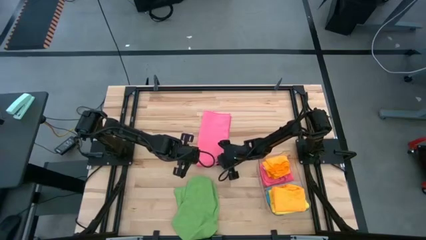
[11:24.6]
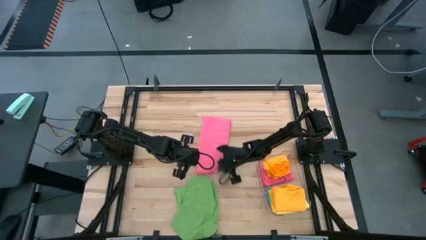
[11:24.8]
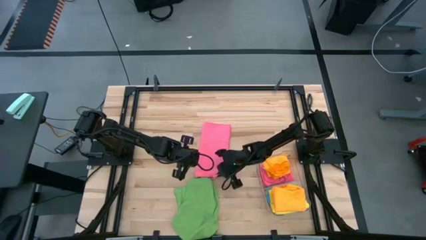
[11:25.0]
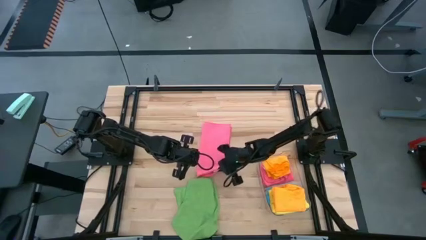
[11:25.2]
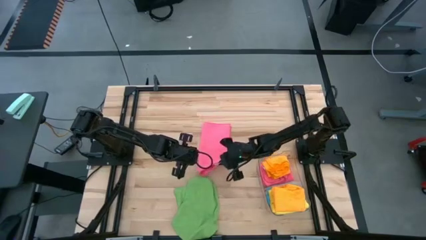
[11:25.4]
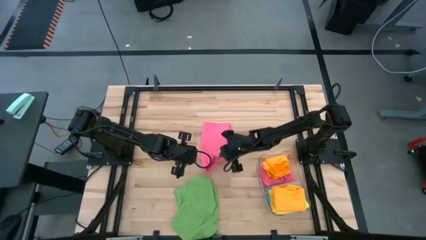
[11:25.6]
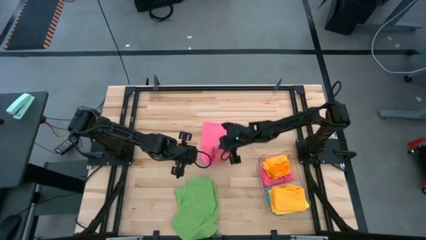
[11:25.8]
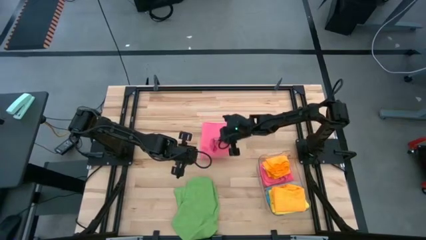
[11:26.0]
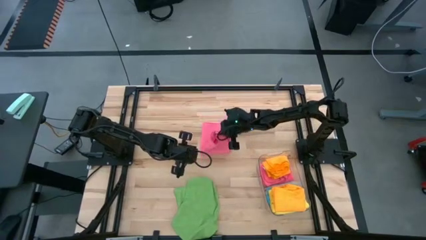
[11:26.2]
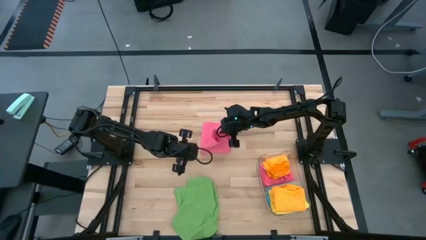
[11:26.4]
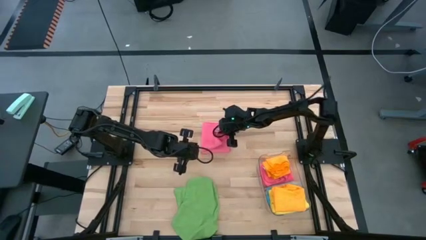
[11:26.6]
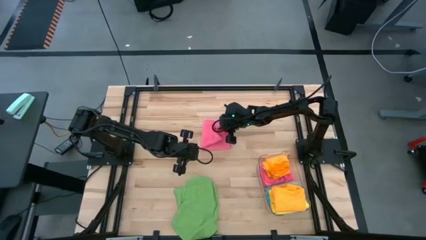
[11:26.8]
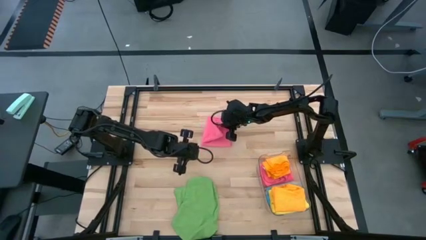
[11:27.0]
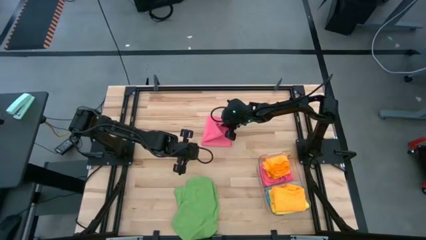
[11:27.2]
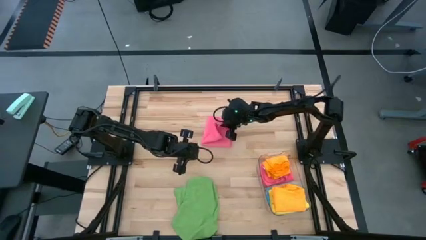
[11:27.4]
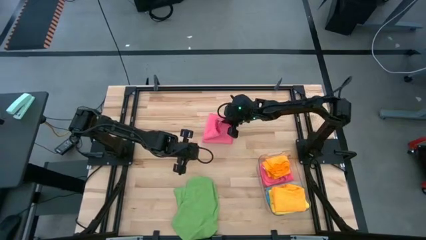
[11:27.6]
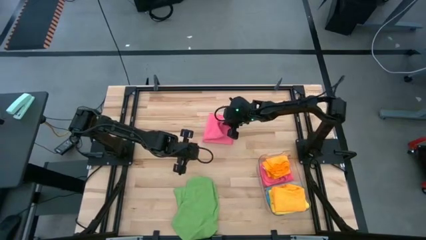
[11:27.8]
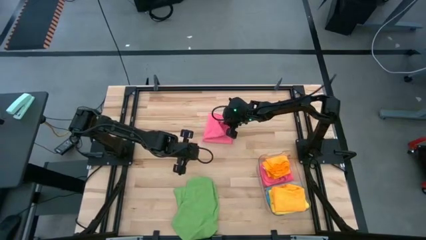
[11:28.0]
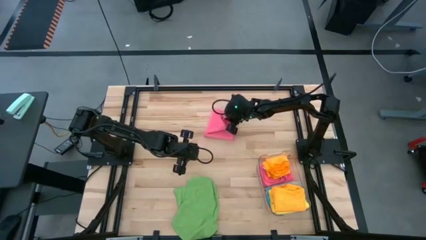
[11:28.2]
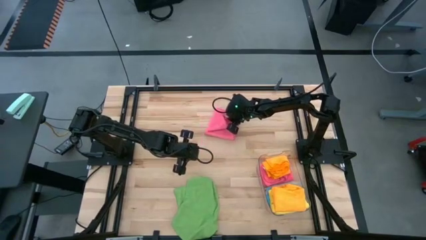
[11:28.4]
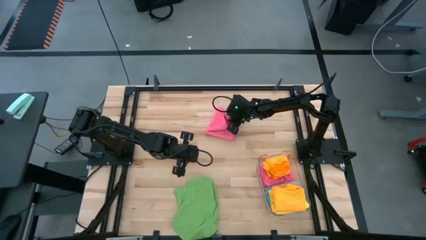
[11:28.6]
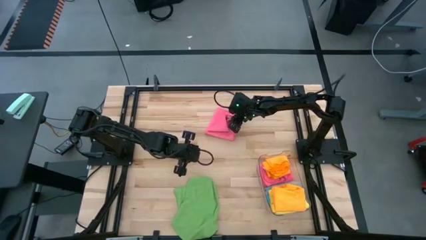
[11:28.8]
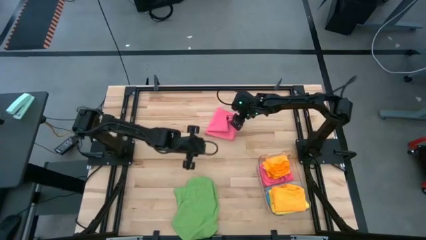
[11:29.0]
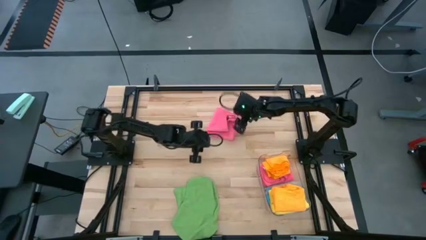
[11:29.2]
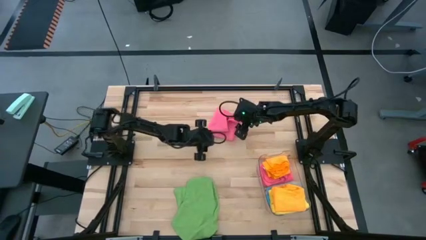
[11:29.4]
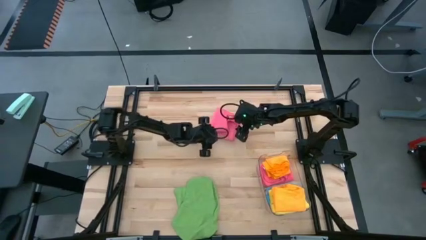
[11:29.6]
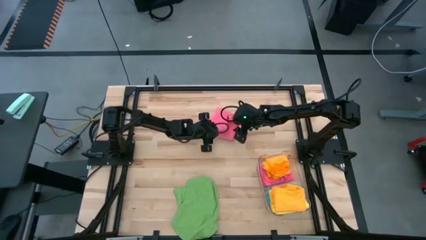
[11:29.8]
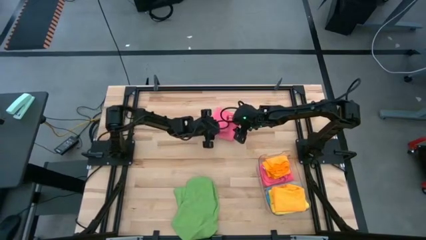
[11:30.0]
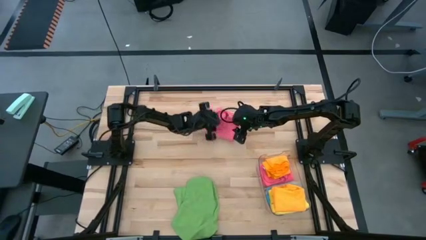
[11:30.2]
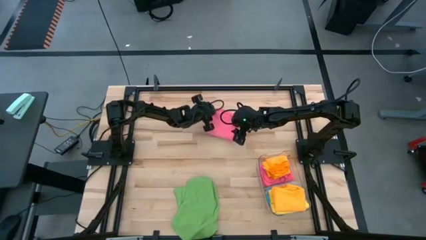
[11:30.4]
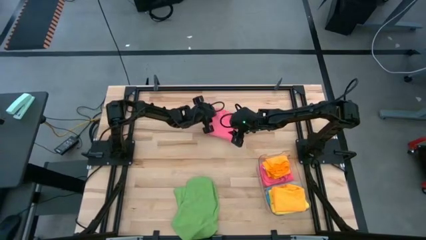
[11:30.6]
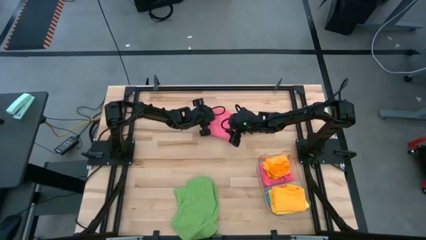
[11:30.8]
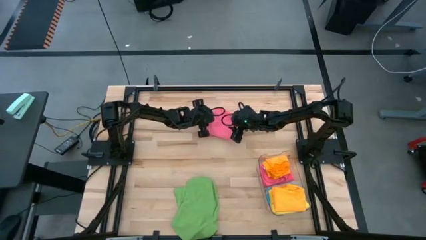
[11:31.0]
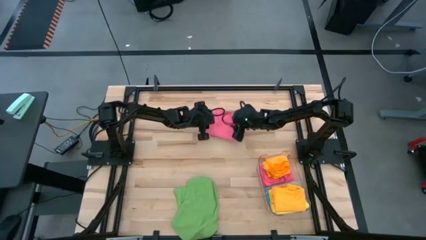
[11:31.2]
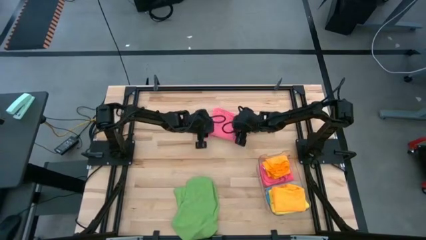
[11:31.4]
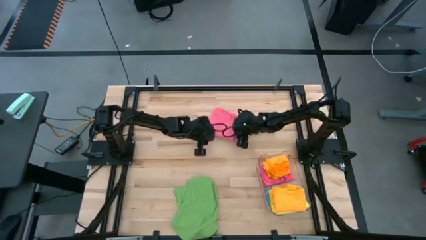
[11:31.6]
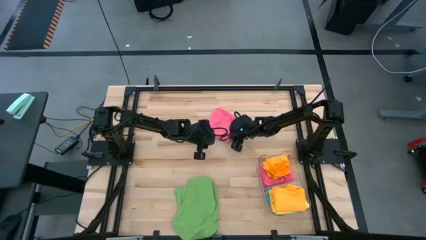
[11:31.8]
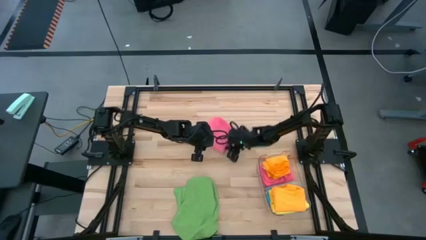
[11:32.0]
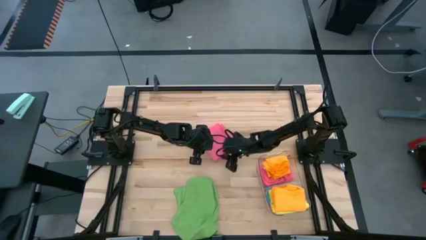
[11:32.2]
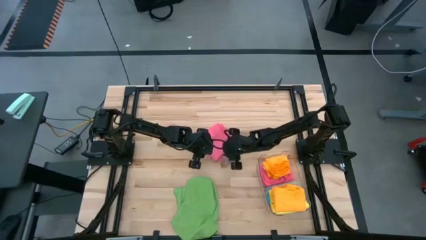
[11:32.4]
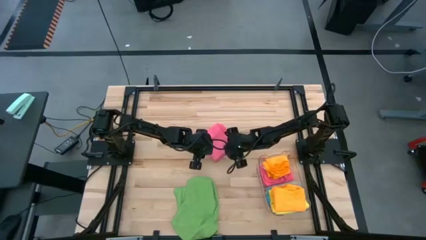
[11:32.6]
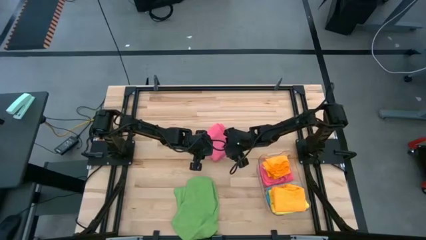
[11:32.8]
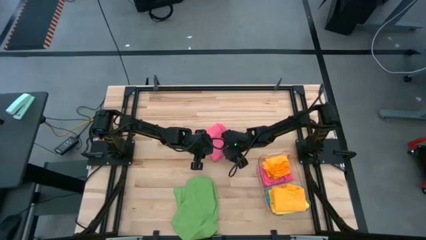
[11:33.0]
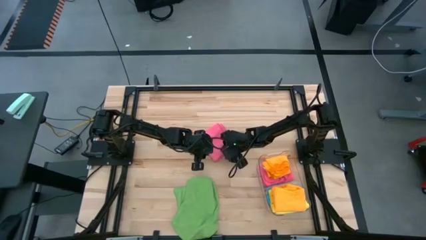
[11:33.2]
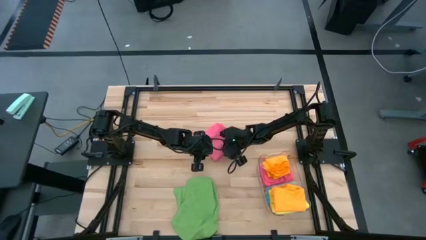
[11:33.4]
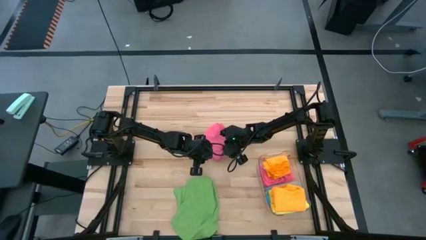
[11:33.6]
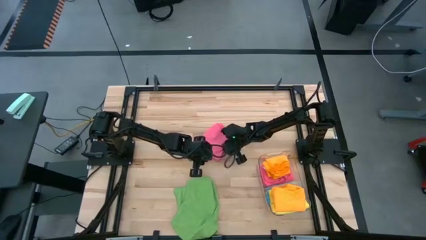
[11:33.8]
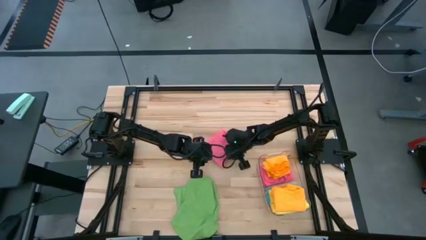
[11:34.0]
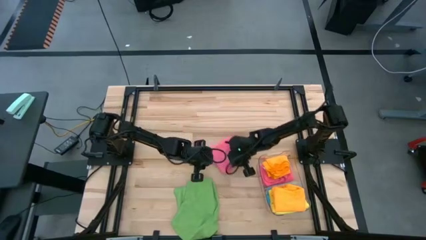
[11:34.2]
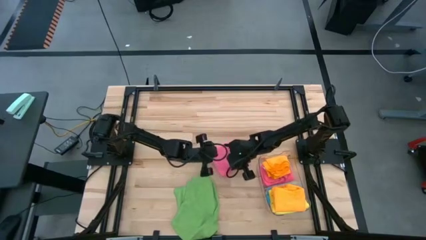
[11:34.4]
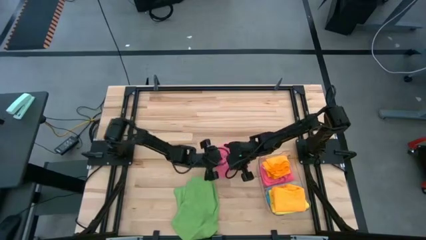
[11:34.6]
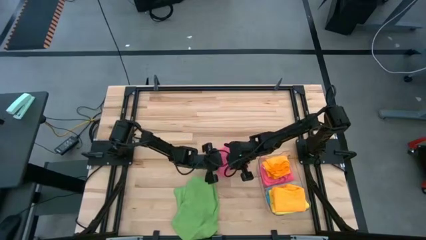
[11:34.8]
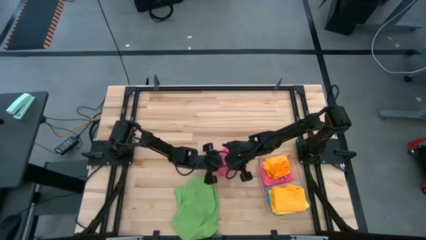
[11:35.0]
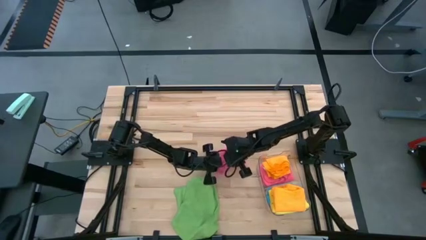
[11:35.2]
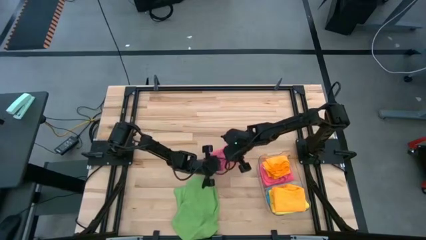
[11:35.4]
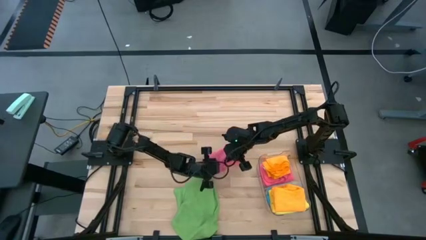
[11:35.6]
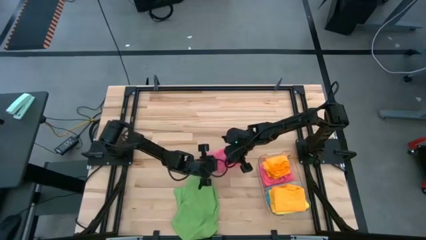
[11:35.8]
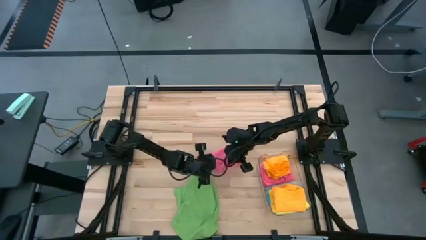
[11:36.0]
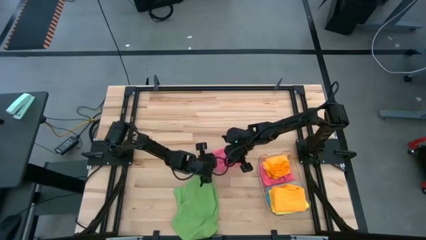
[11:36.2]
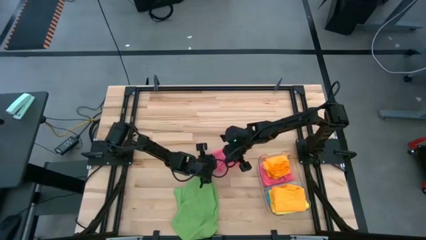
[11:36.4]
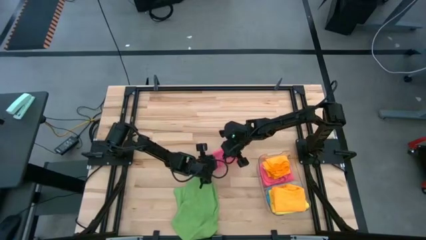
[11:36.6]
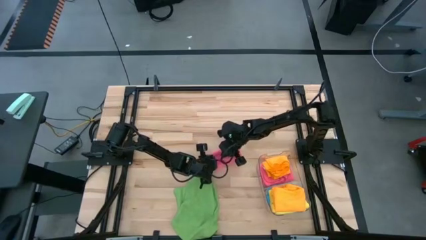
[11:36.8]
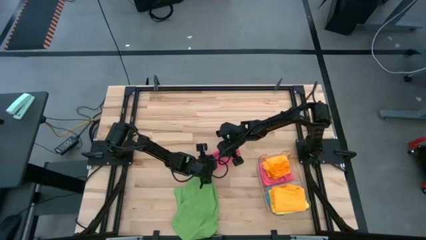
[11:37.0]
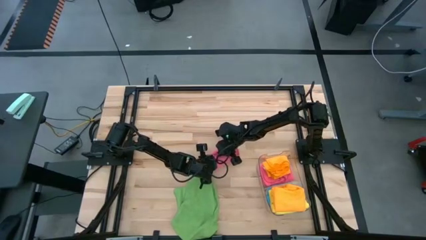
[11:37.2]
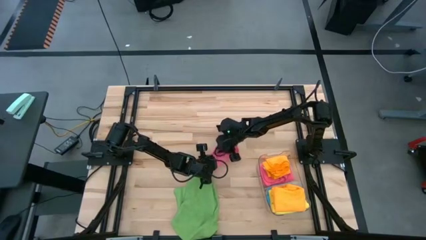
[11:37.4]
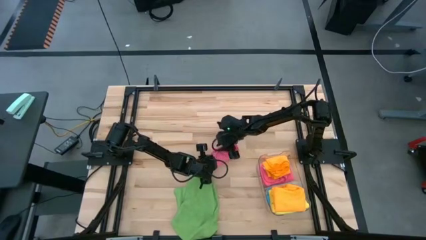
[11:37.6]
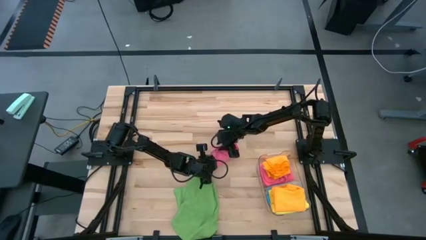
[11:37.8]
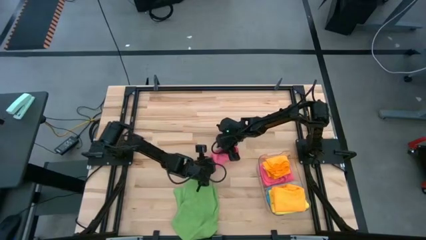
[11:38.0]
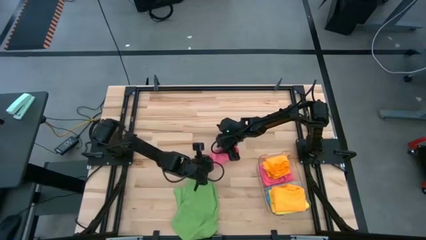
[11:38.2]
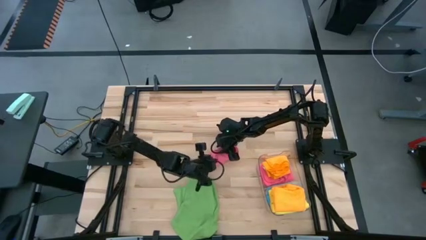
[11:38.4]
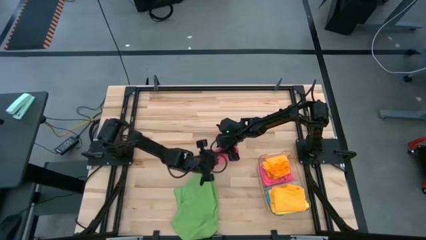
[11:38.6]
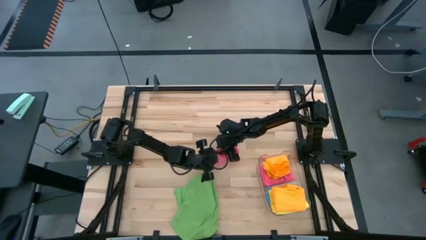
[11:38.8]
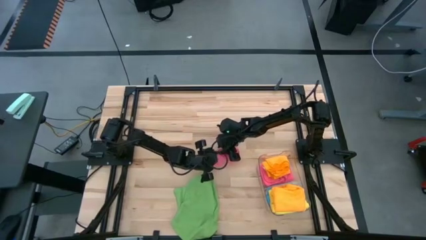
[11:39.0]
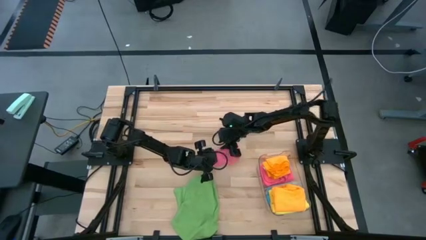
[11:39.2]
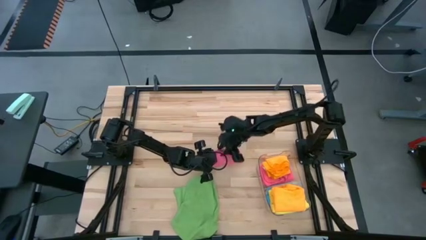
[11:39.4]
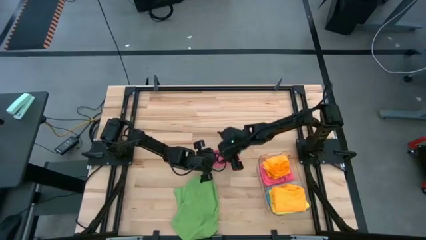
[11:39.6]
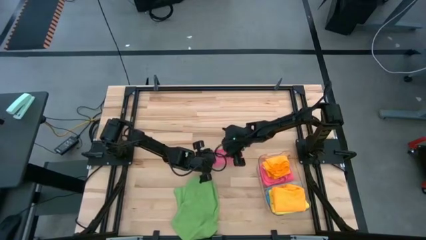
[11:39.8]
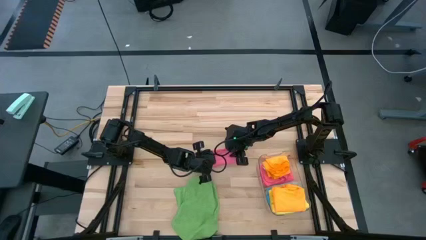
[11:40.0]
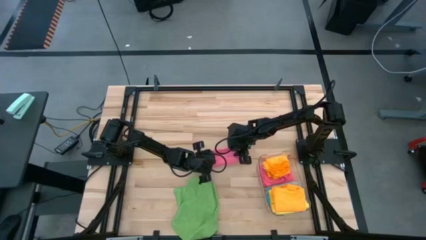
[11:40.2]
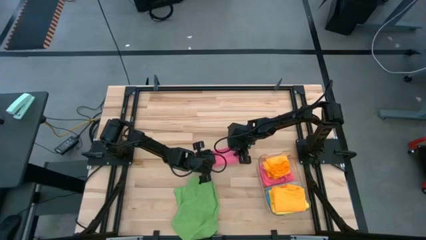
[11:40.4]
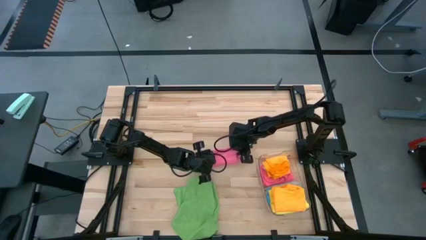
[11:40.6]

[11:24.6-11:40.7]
Task: Fold microfiber towels
Fold the pink towel
